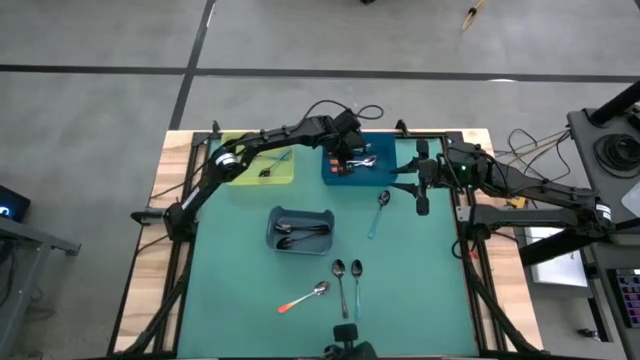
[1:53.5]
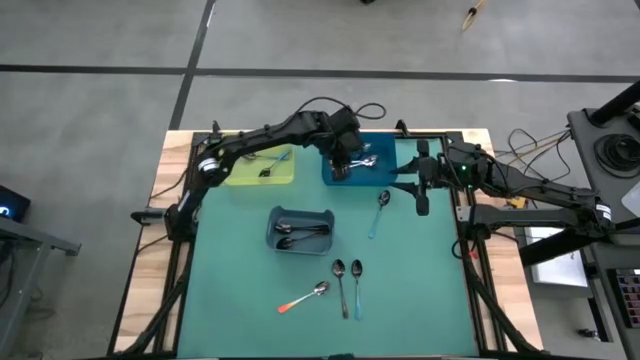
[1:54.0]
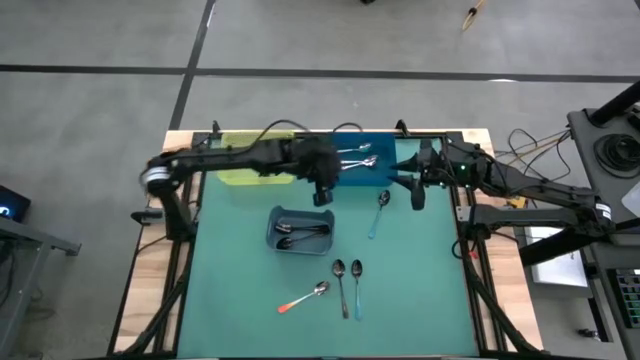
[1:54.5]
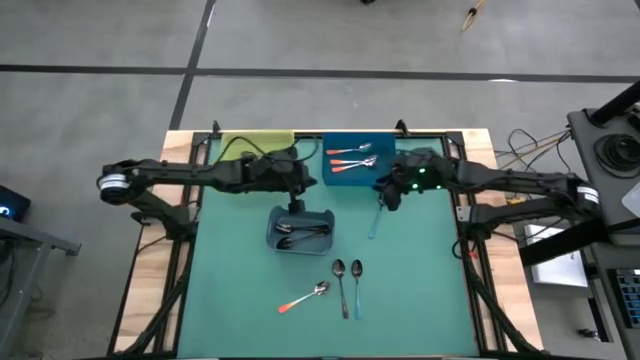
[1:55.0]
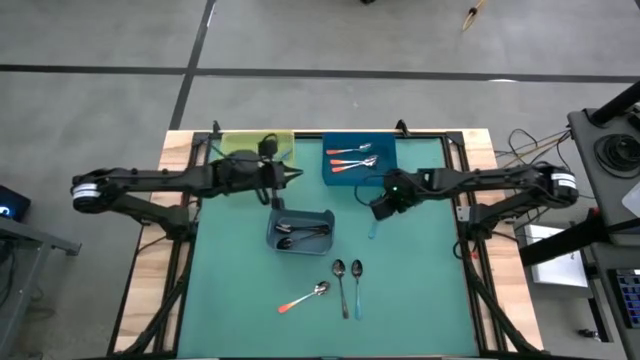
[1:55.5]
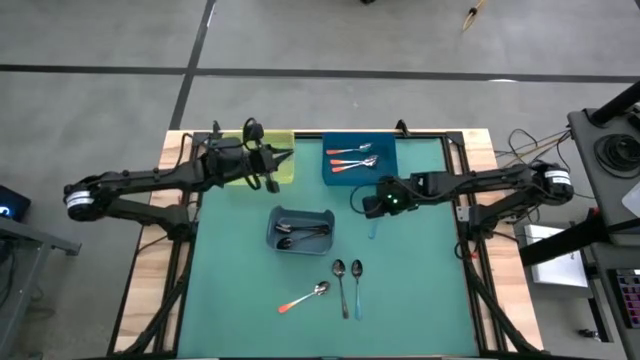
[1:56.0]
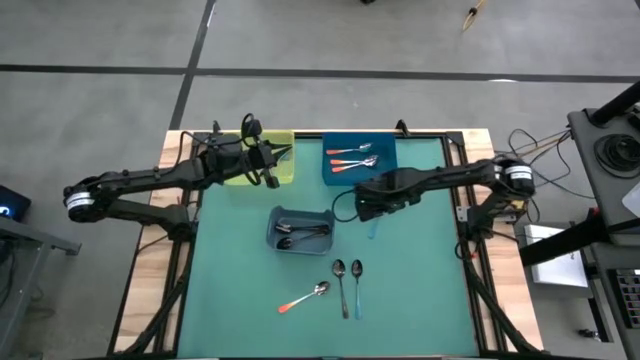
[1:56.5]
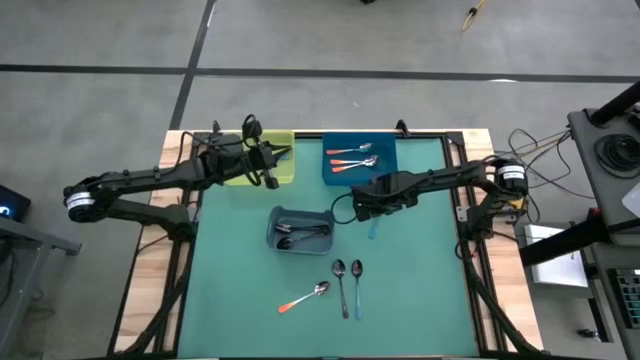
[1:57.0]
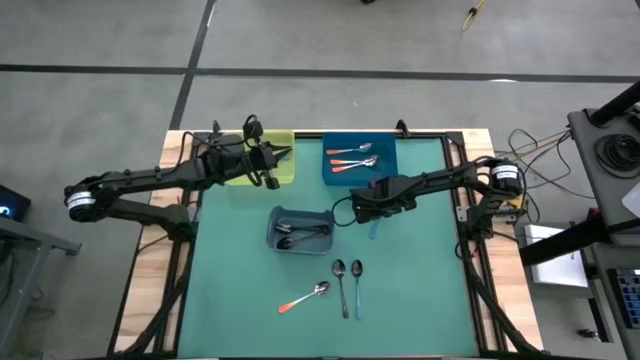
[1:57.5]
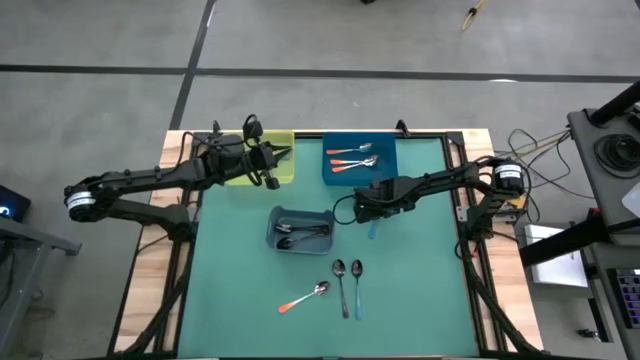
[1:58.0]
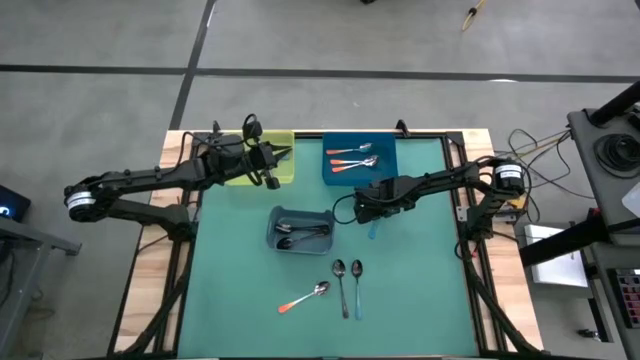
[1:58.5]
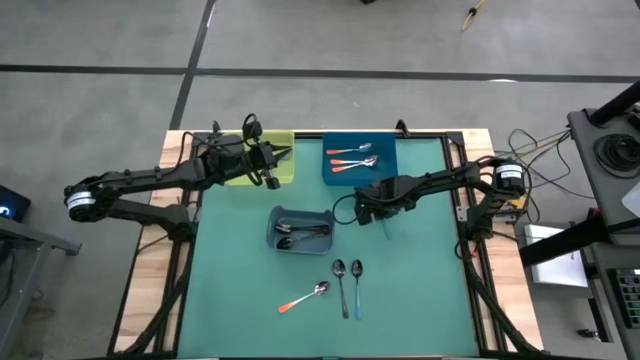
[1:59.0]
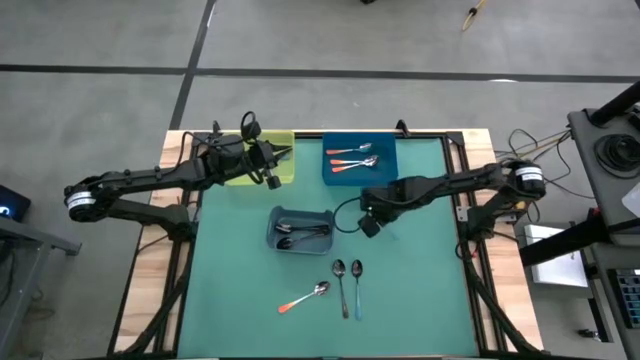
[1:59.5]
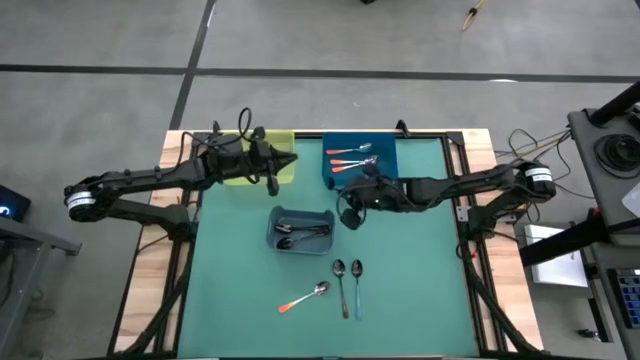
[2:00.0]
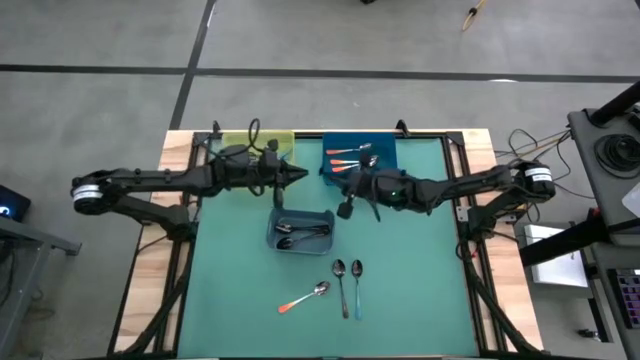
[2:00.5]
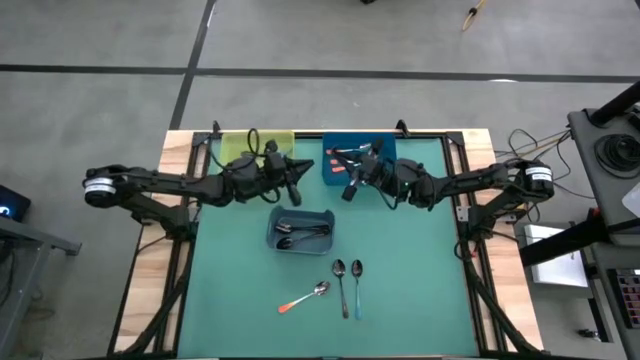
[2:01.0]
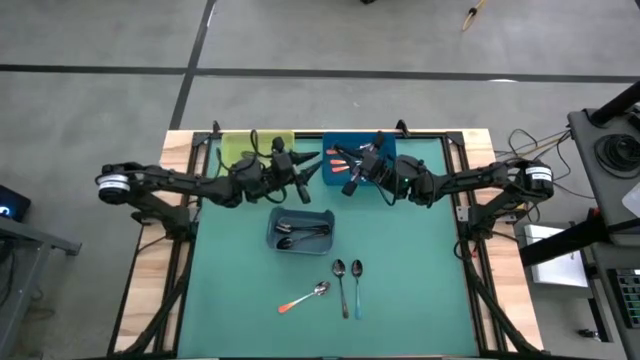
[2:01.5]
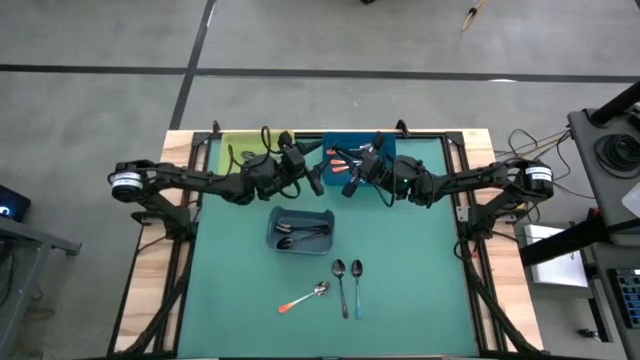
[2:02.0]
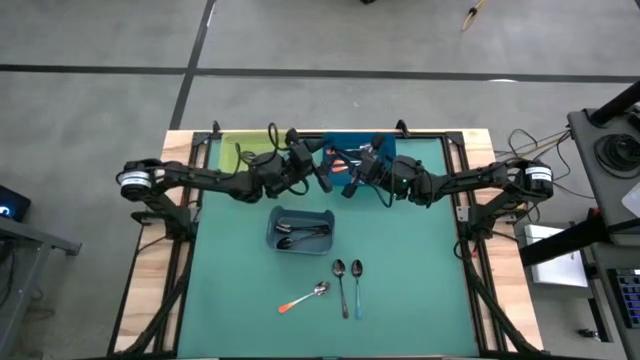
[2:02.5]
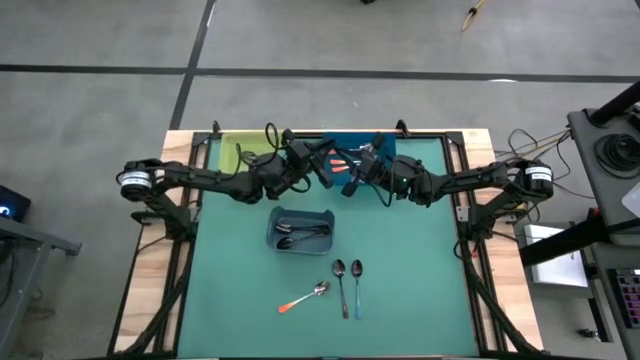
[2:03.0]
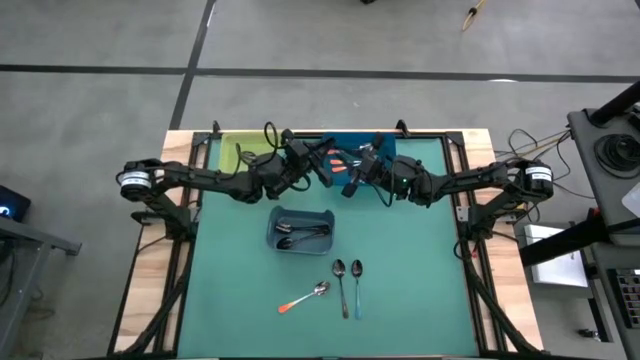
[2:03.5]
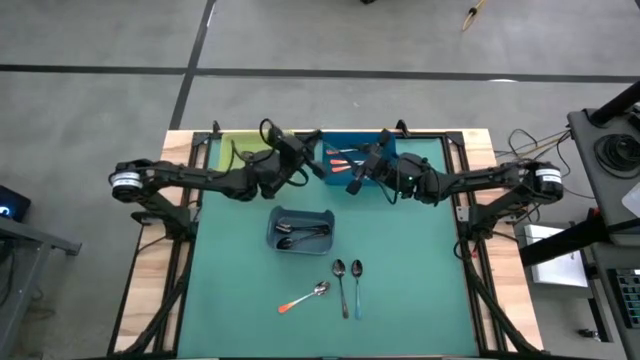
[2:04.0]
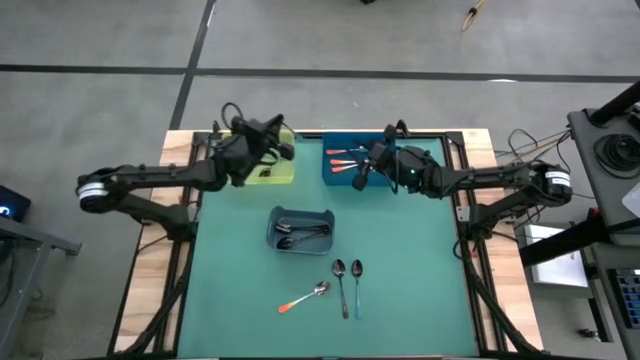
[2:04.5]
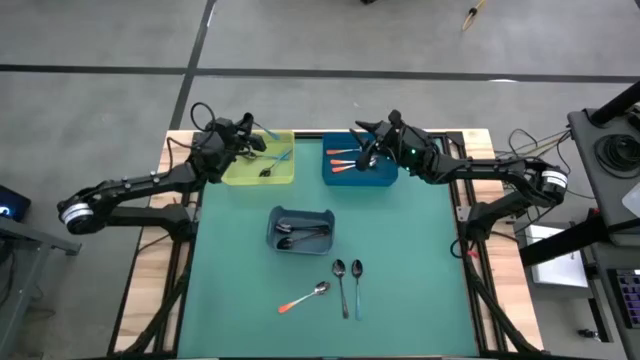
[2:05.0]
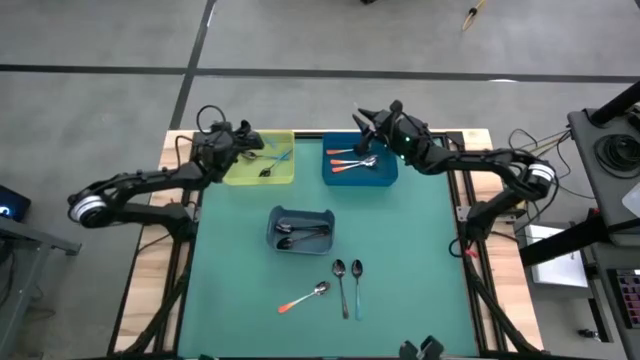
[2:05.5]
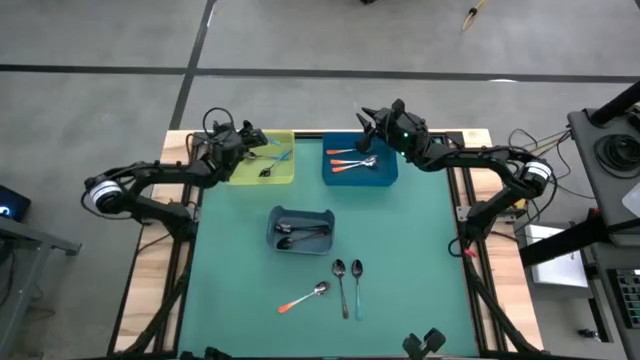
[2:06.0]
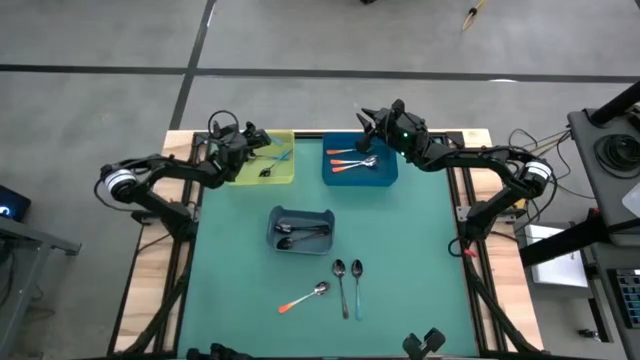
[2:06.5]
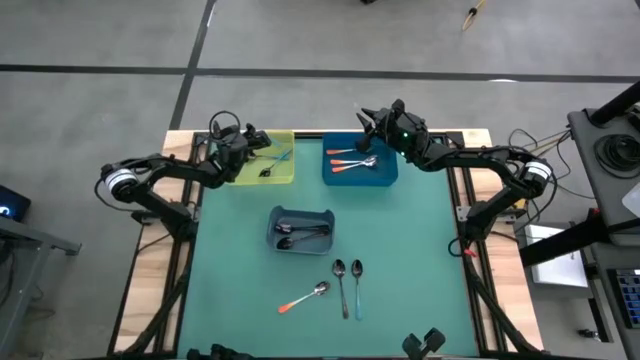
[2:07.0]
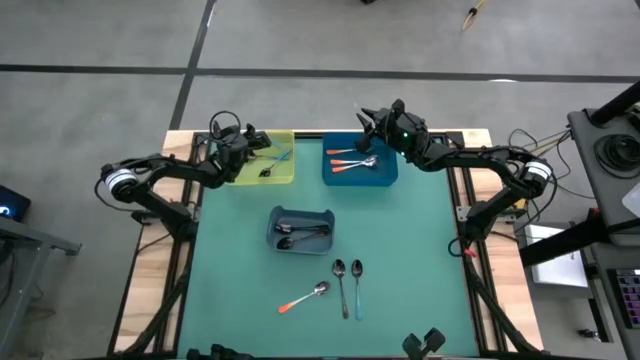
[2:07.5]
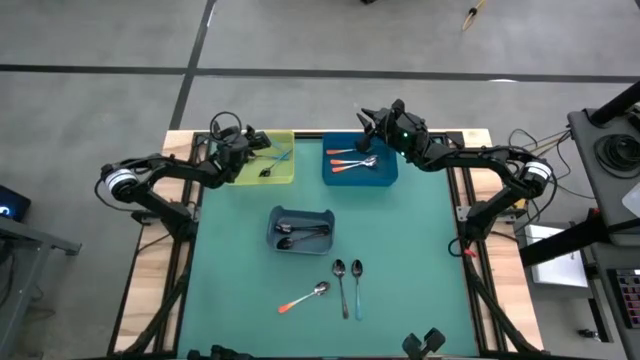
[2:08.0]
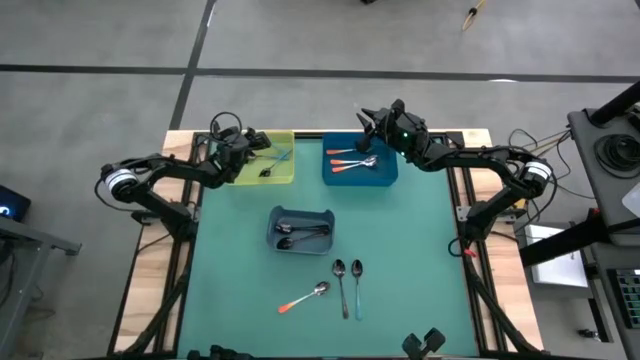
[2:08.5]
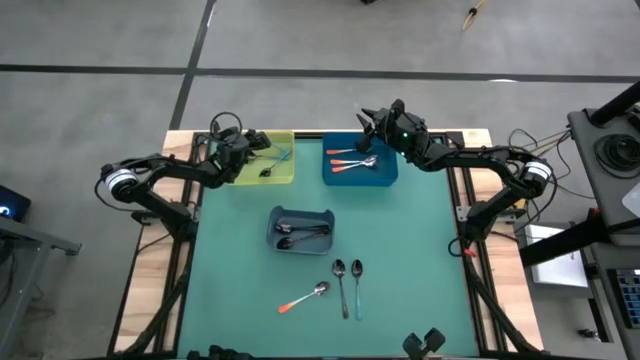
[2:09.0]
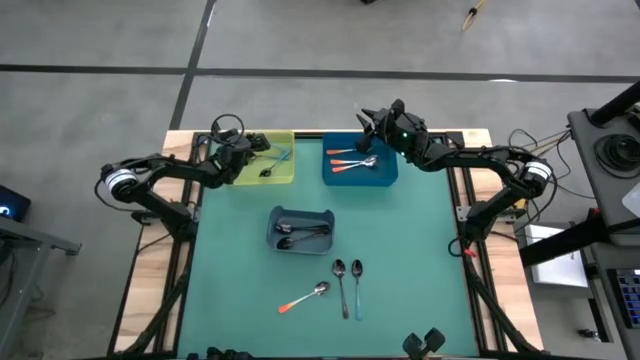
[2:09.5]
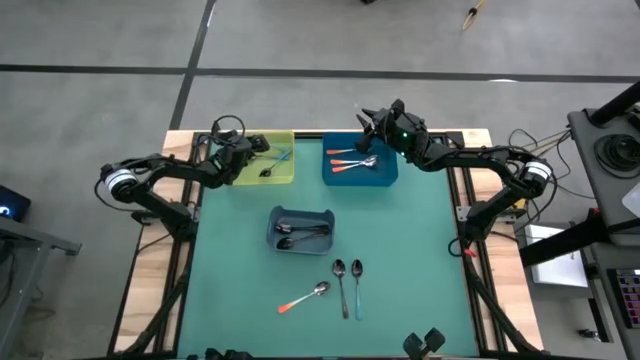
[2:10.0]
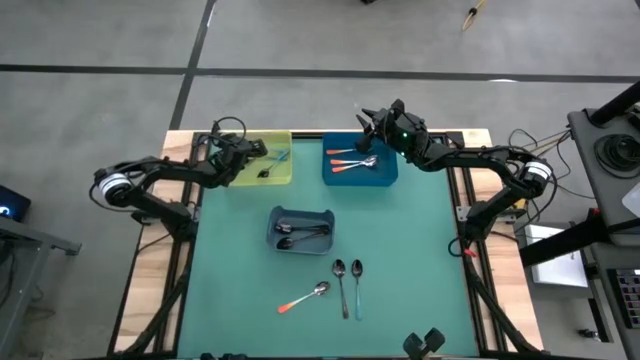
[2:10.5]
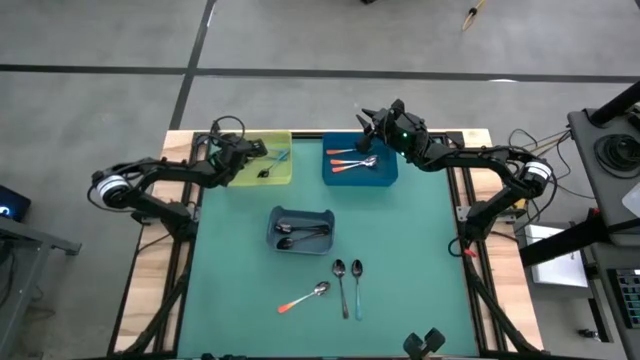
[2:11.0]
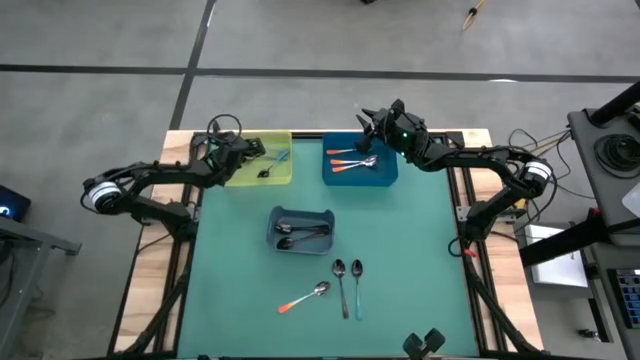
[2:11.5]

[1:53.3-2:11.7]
Task: Sort silverware by color (type)
Put the blue spoon into the green bin

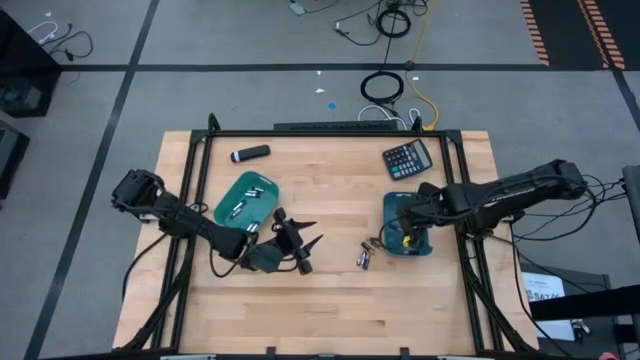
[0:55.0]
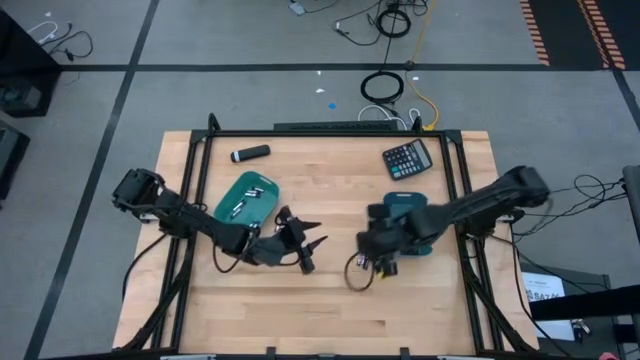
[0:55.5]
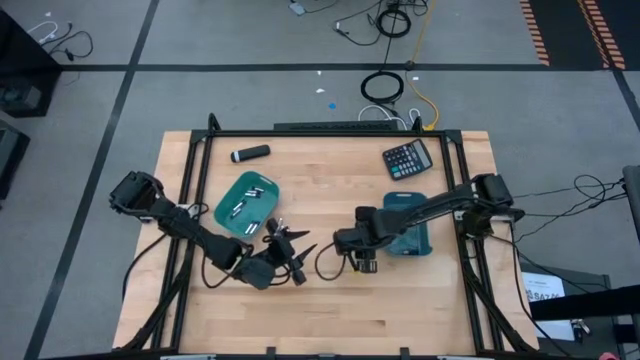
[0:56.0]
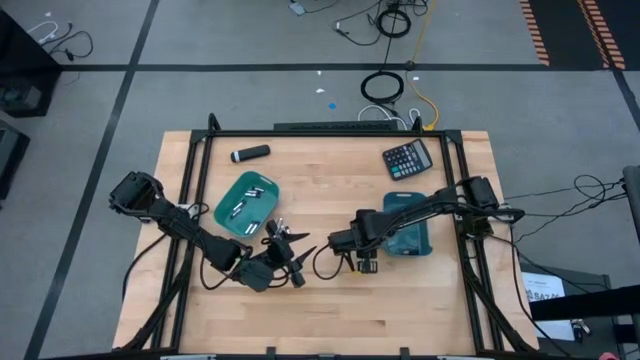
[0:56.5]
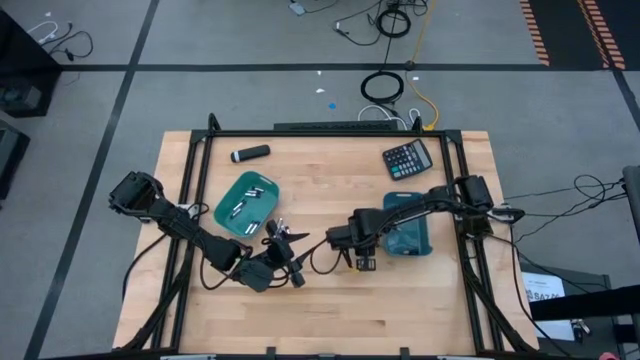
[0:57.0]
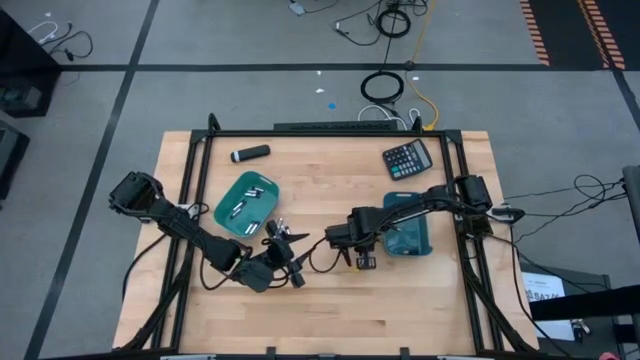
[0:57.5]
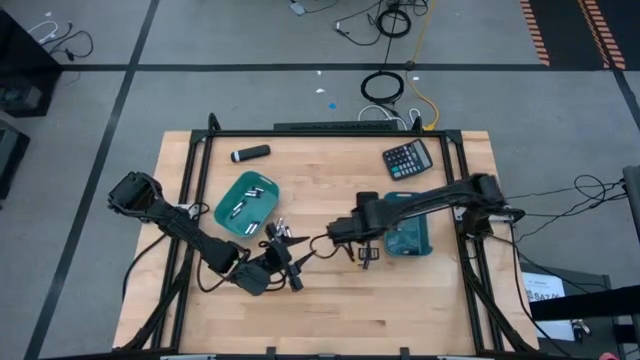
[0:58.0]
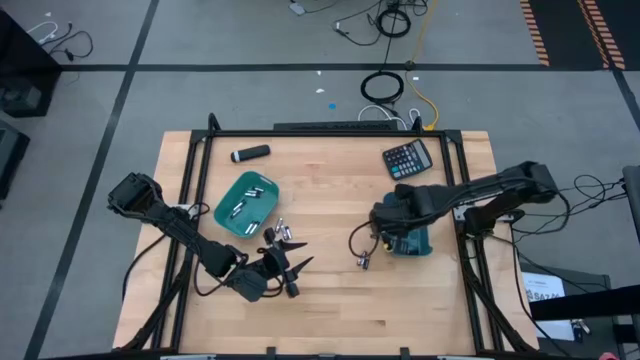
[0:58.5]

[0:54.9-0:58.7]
Task: Sort batteries
Put the black battery into the blue bin
